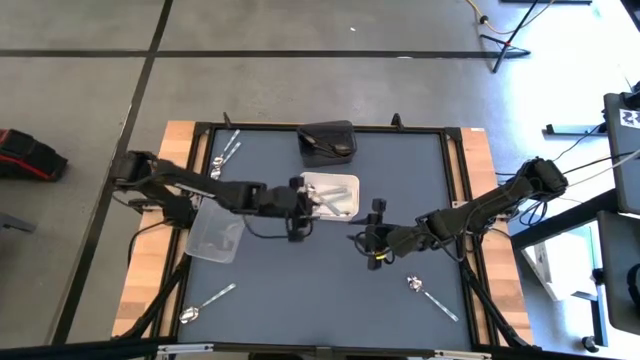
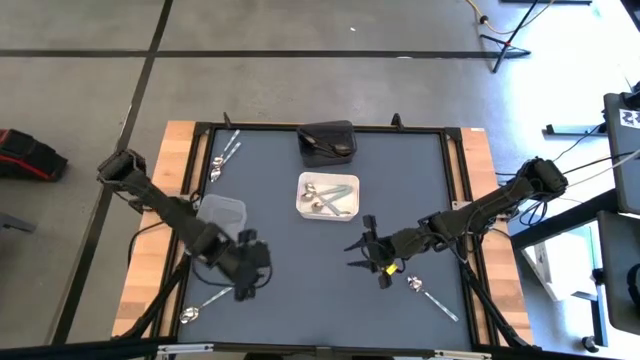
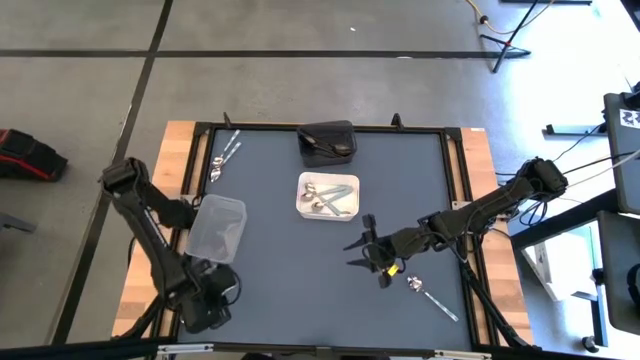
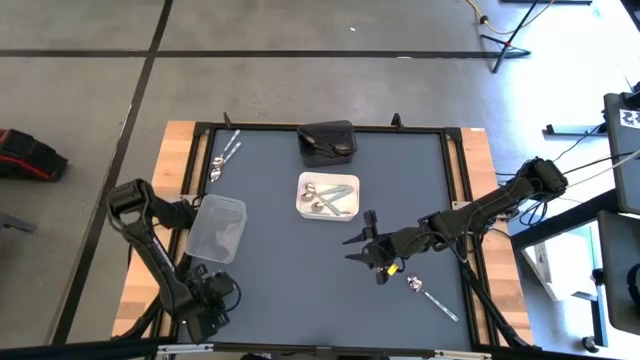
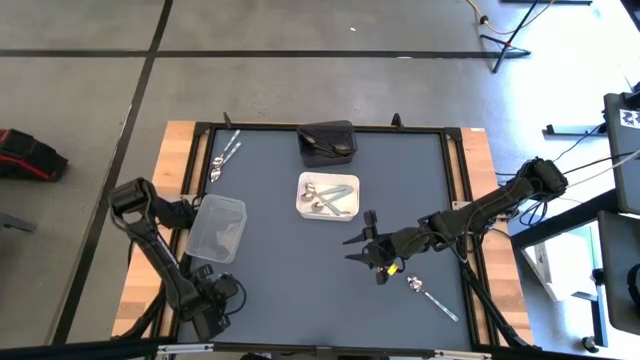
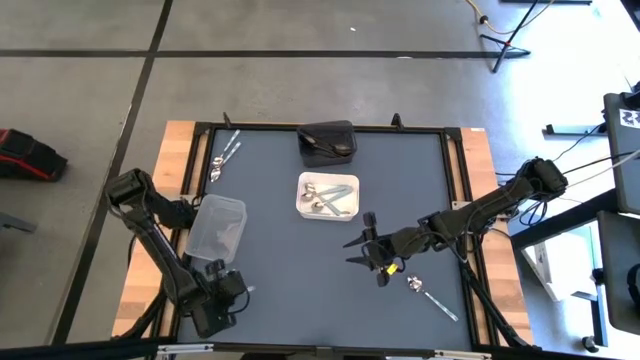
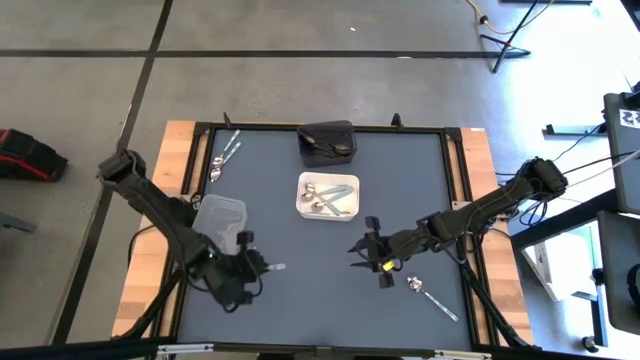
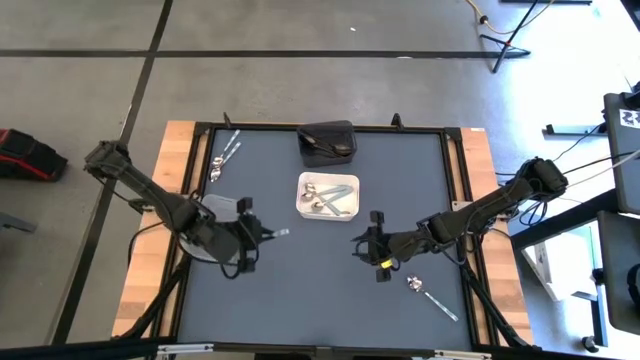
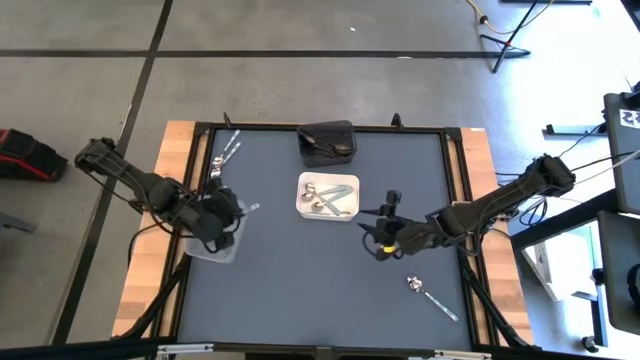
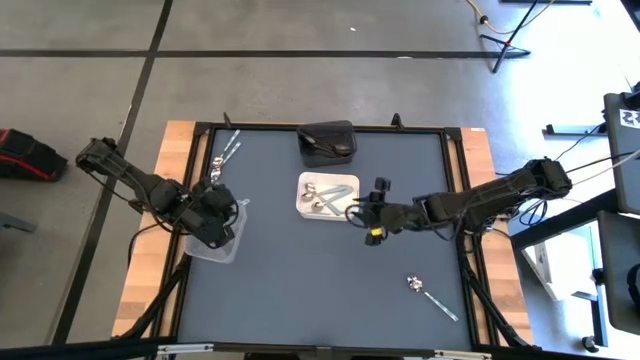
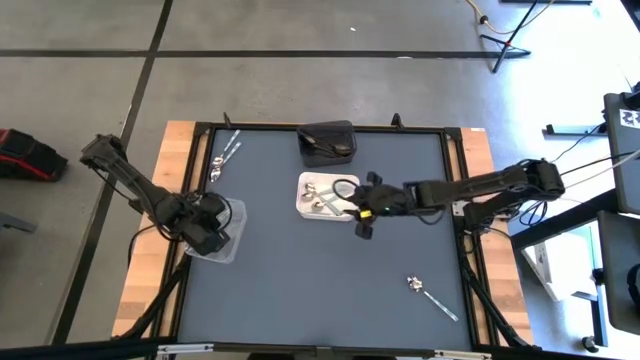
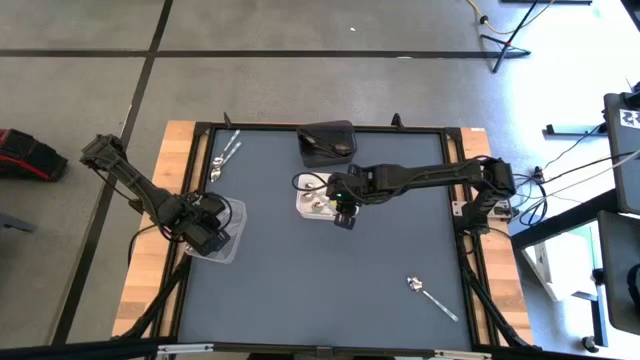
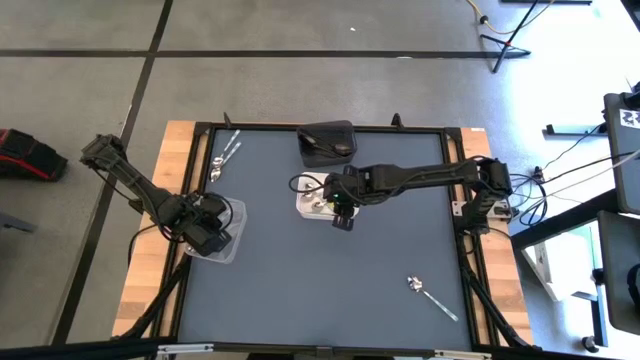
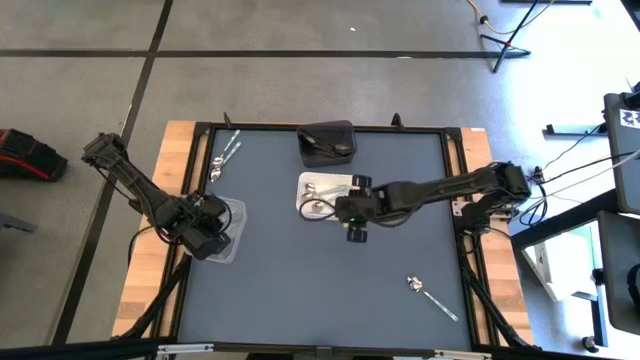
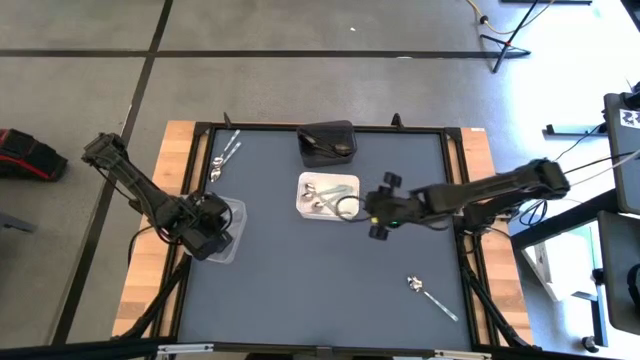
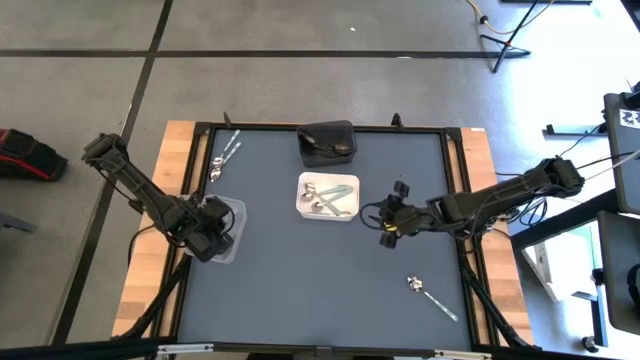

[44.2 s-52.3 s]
Task: Sort silverware by color (type)
Put the white green spoon into the transparent bin

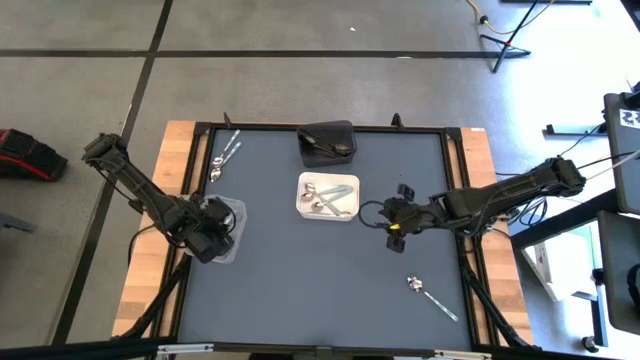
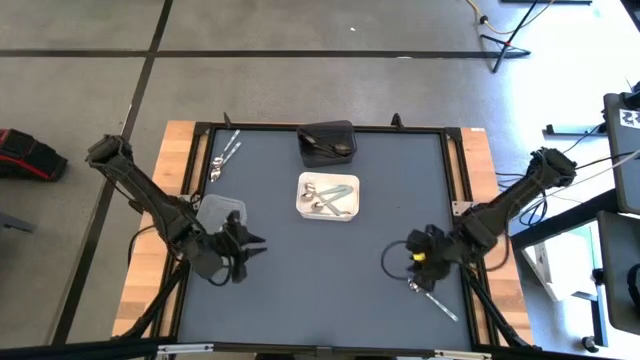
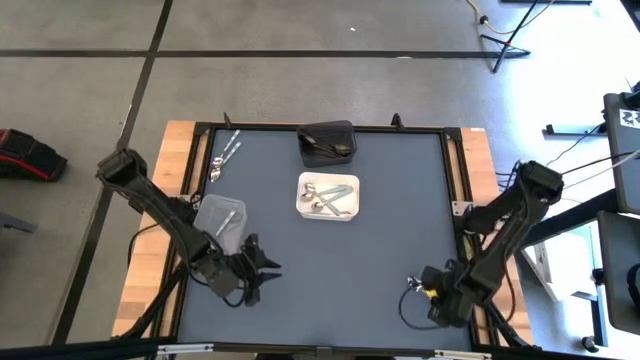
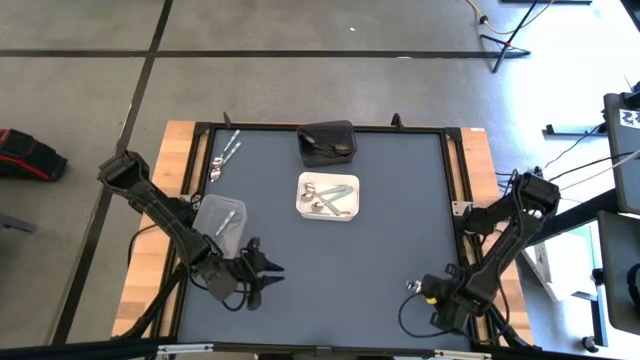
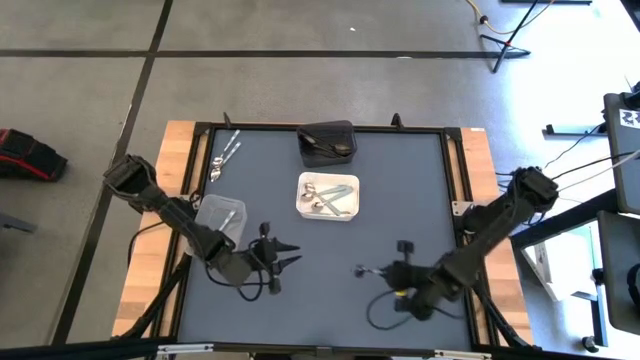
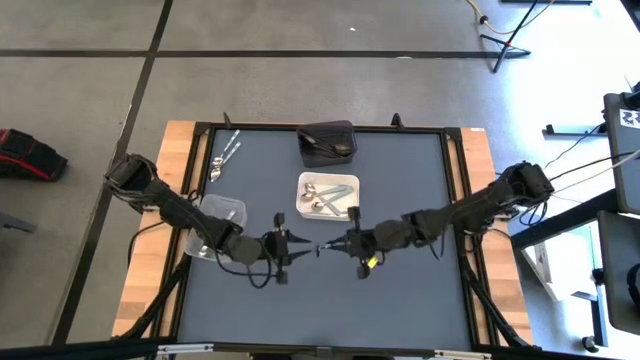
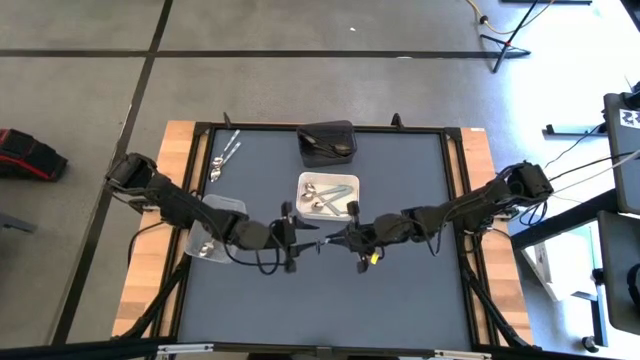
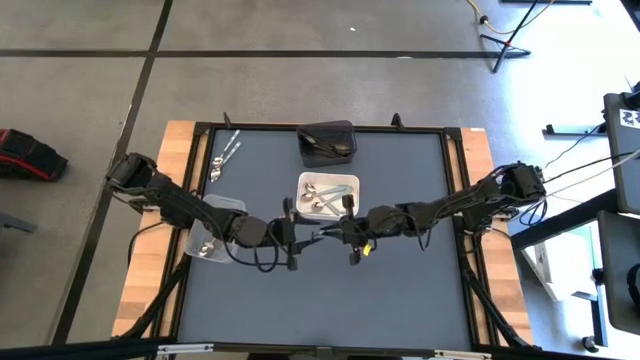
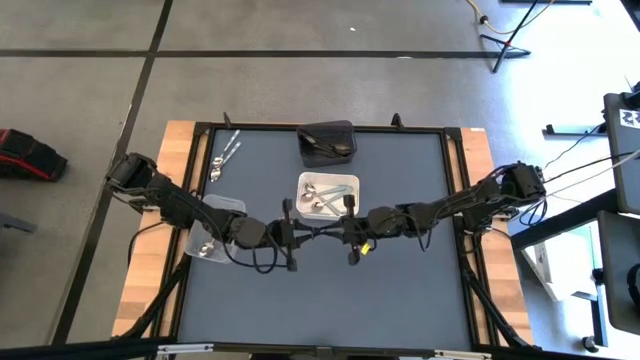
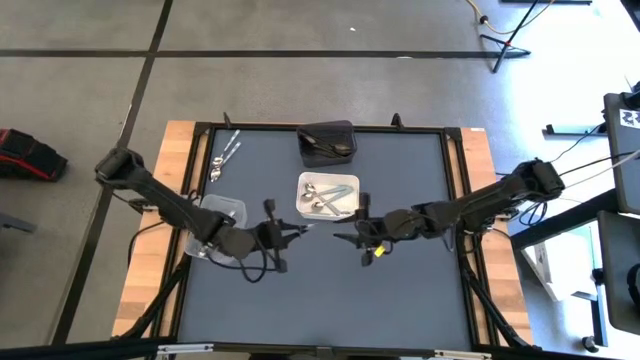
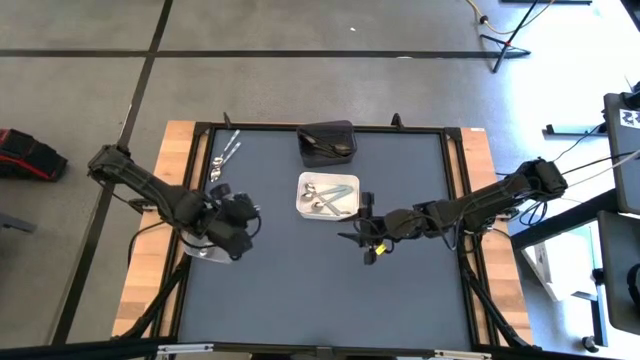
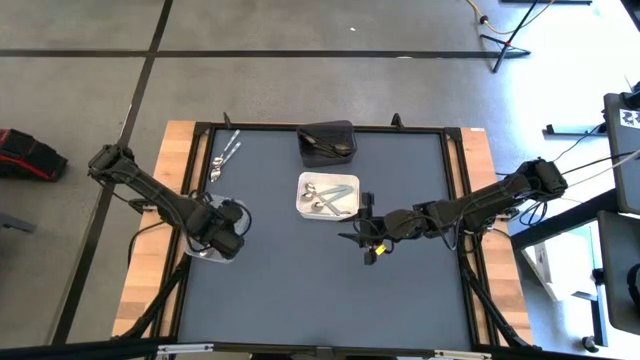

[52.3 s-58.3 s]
Put the white green spoon into the transparent bin

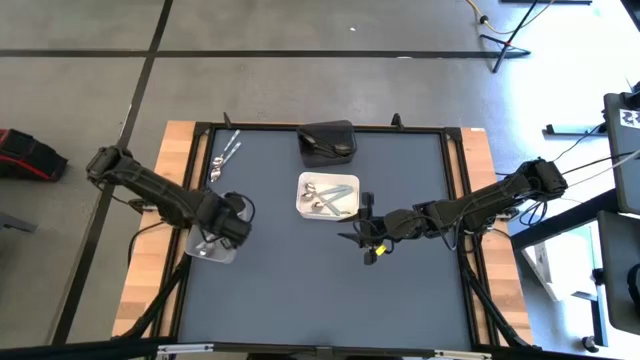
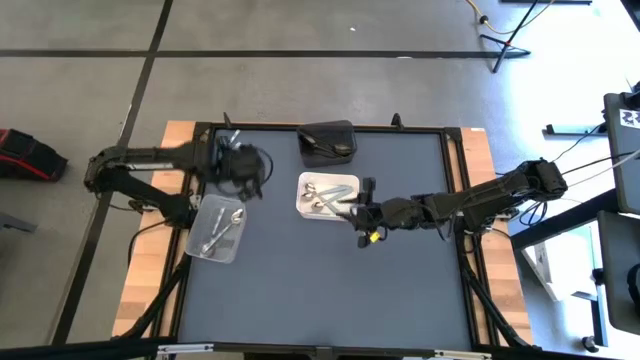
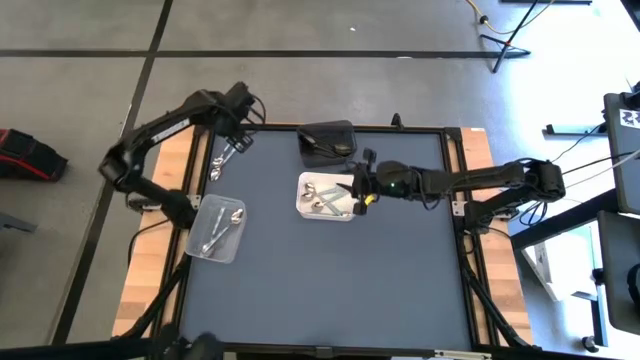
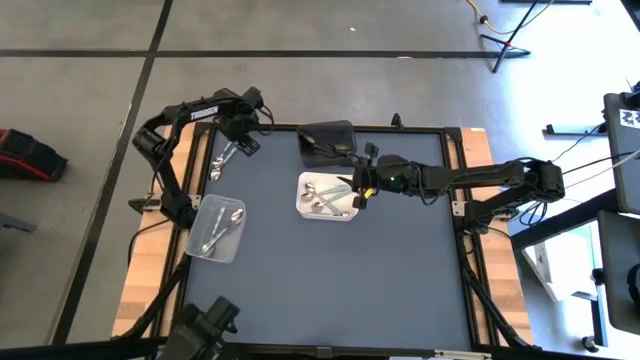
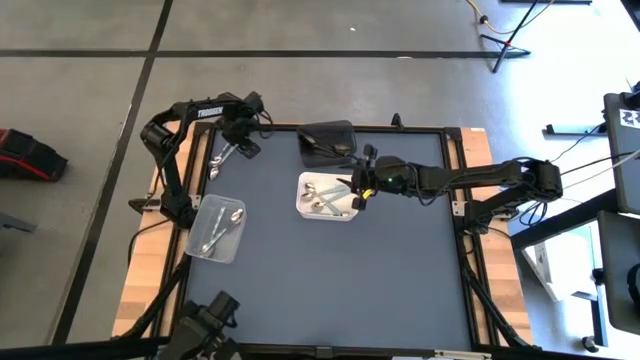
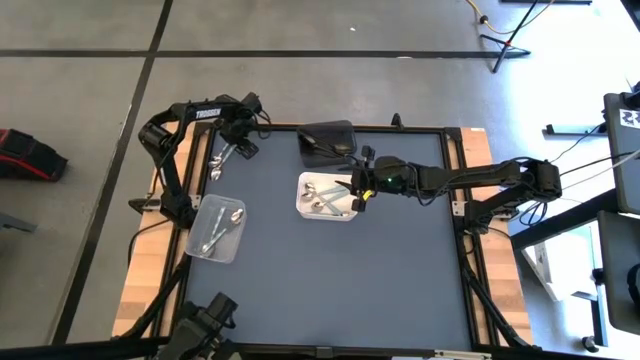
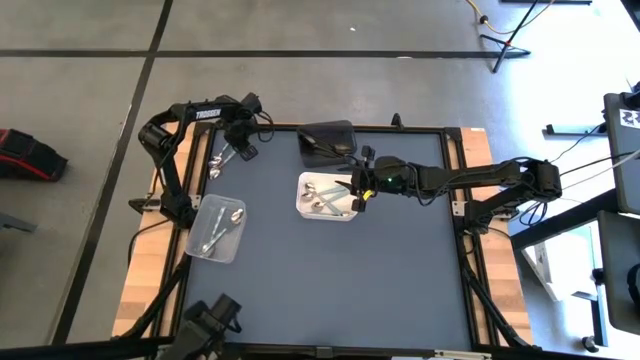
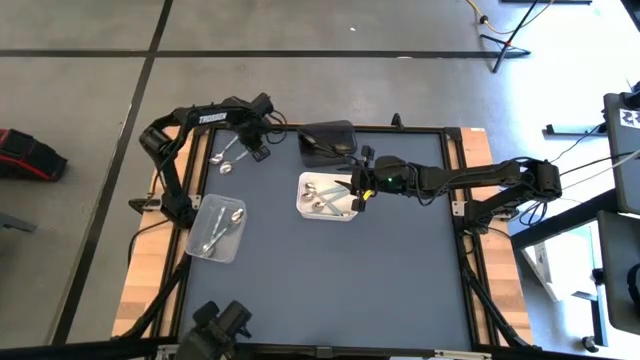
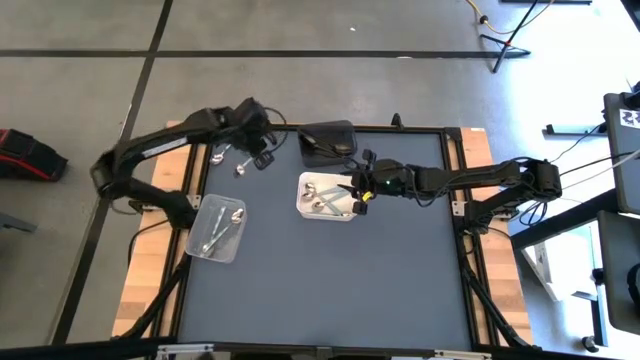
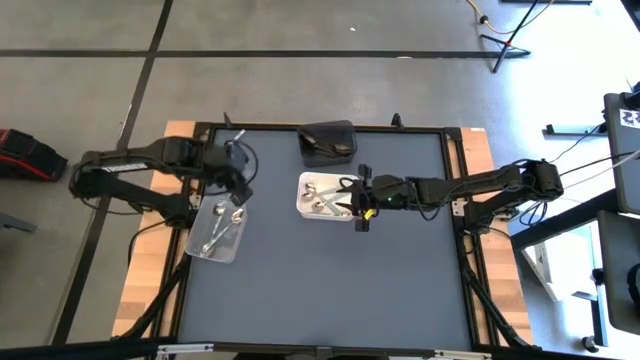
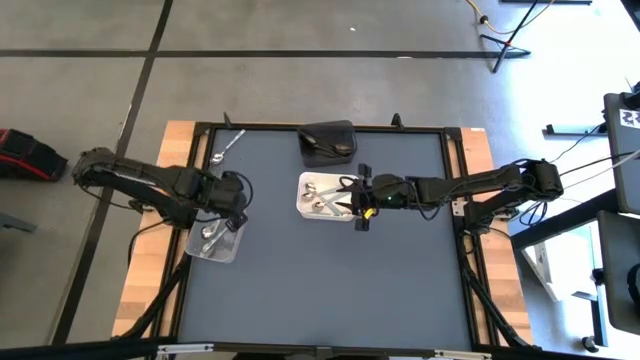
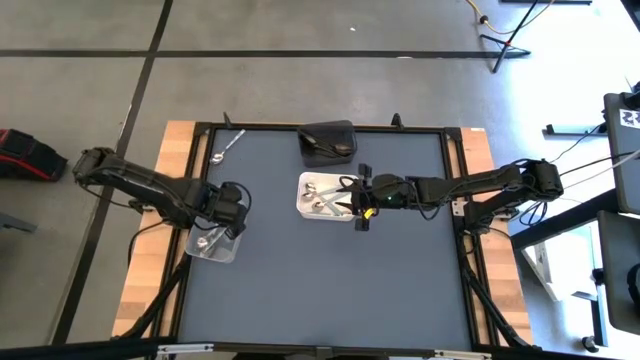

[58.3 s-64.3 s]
Put the white green spoon into the transparent bin

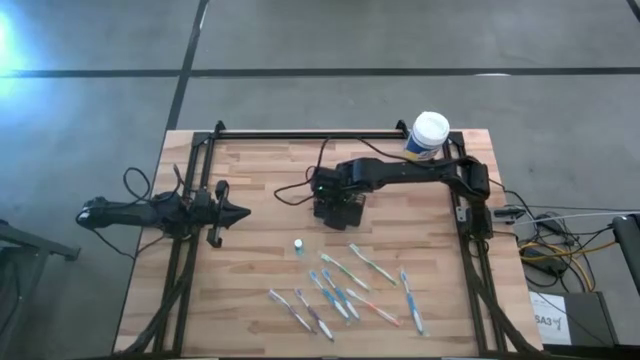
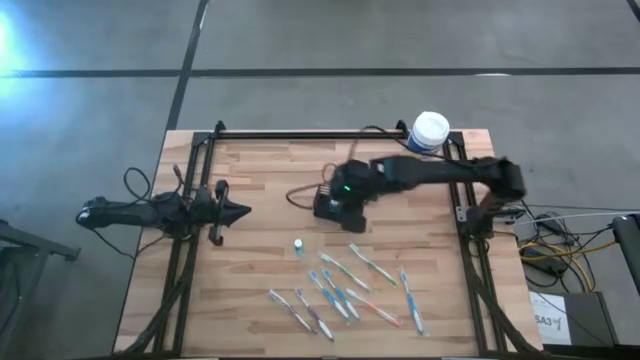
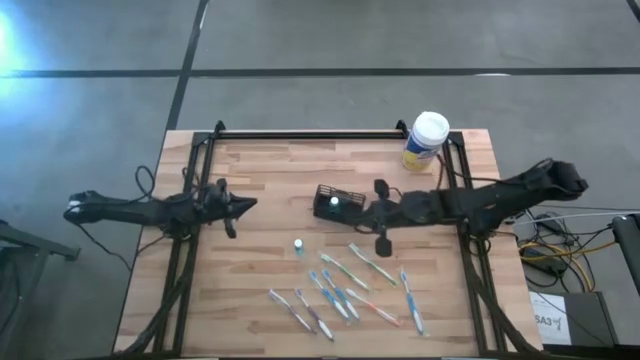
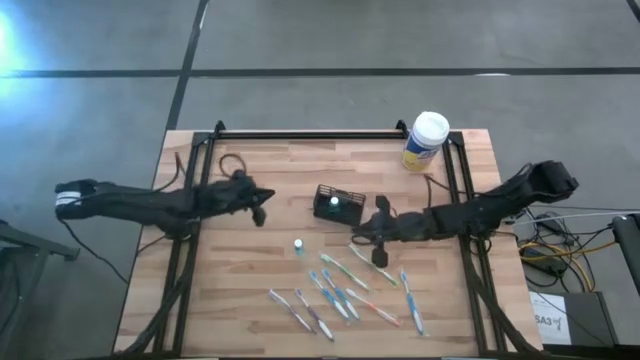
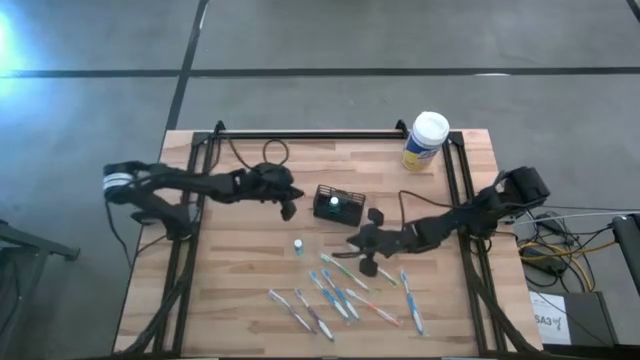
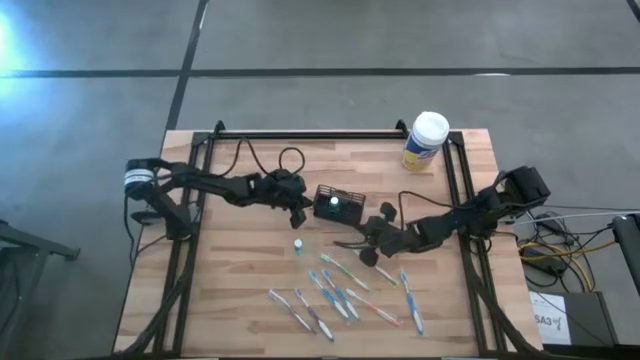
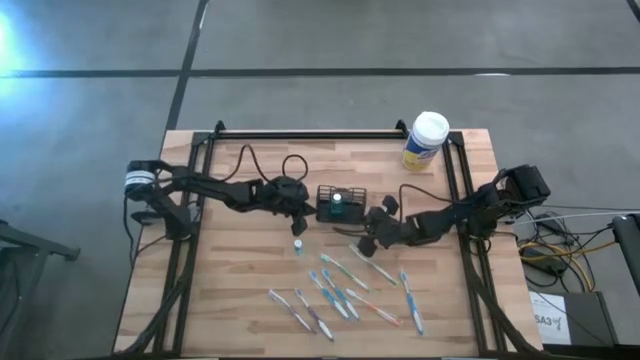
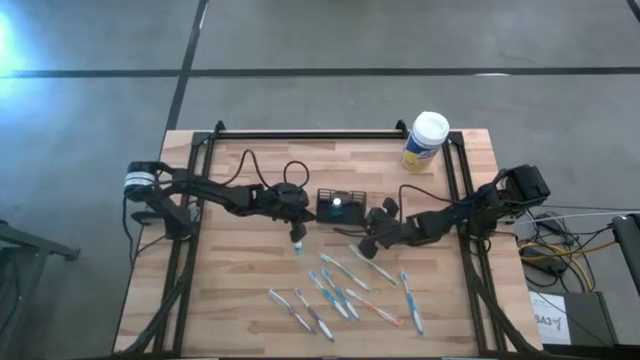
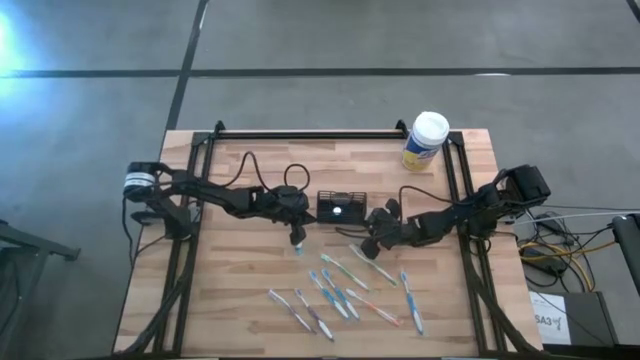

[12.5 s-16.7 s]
Task: Pick & Place toothbrushing station
Adjust the wire organizer
